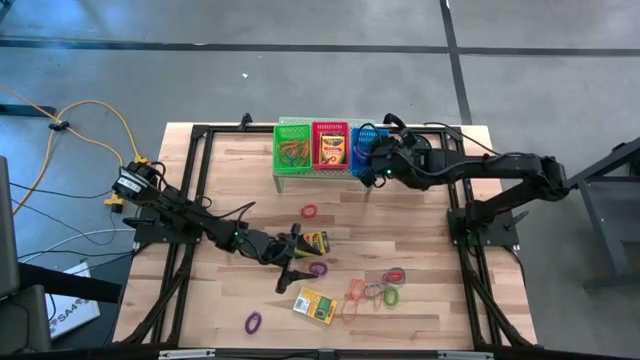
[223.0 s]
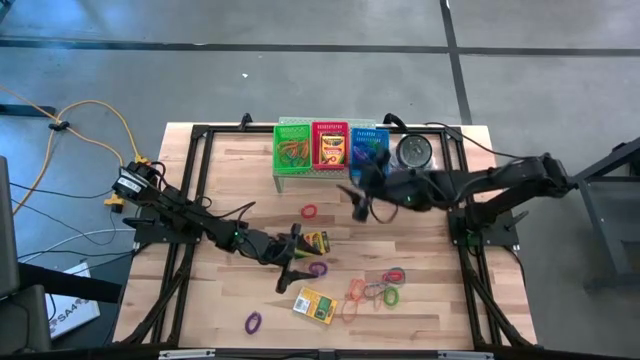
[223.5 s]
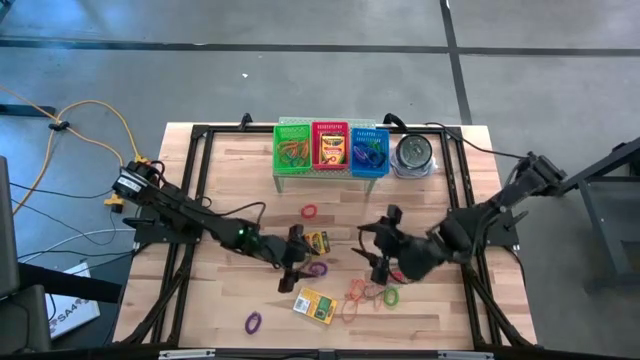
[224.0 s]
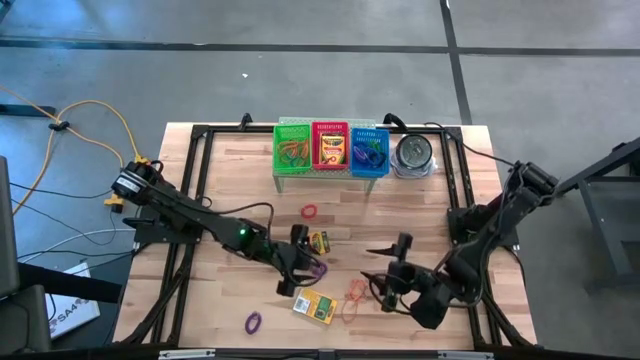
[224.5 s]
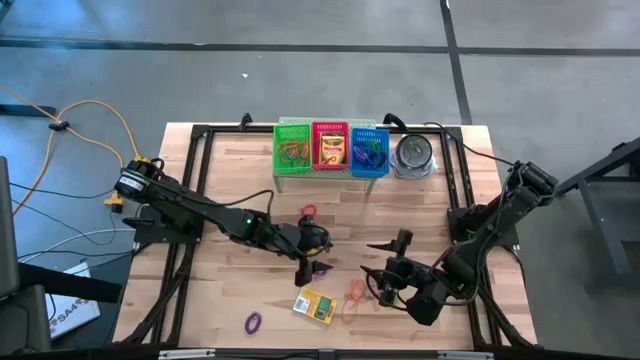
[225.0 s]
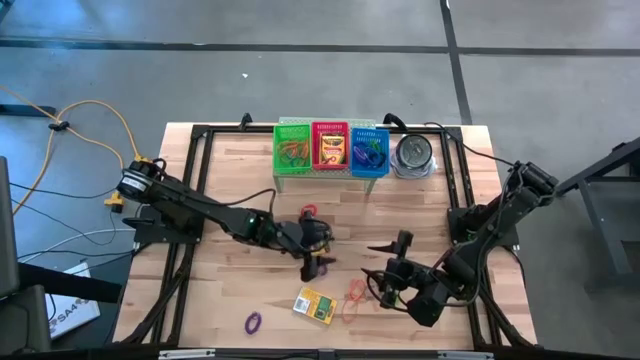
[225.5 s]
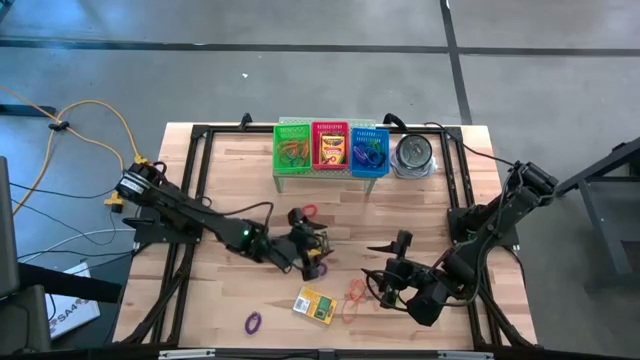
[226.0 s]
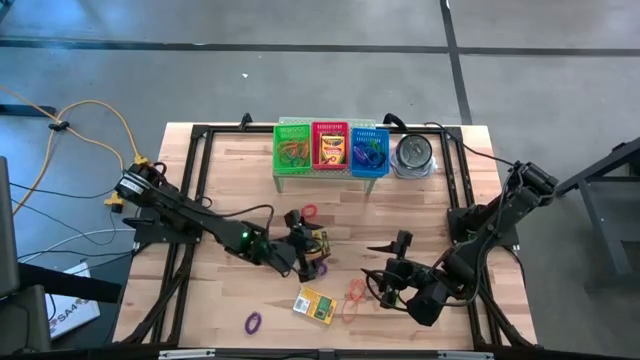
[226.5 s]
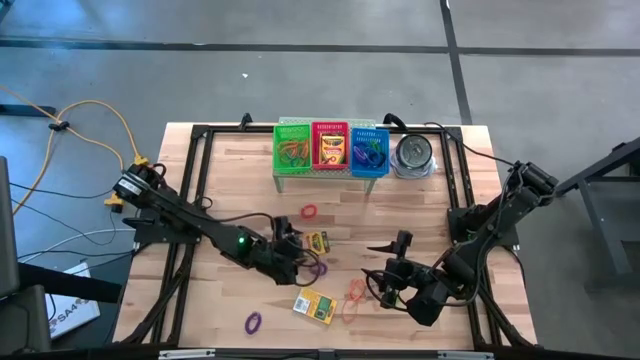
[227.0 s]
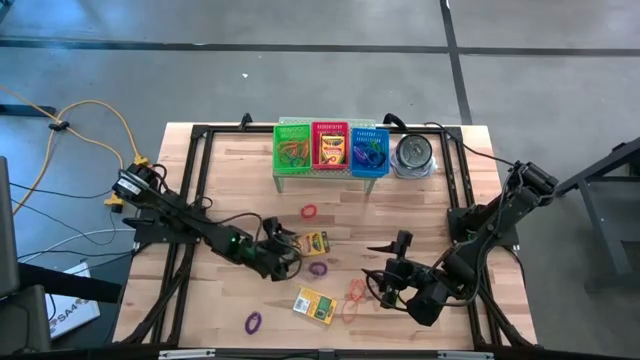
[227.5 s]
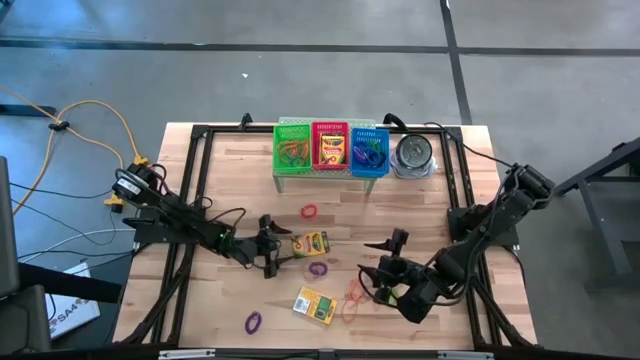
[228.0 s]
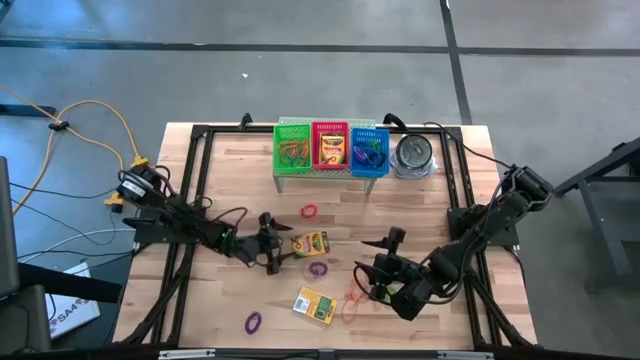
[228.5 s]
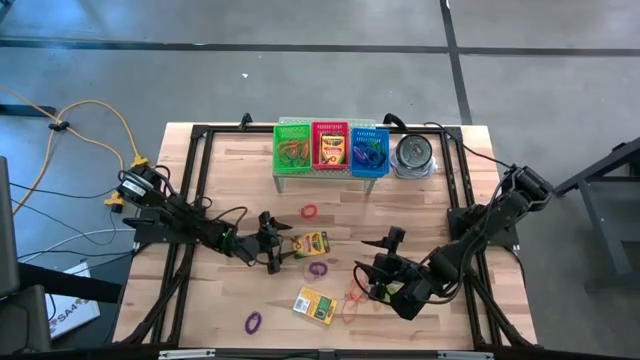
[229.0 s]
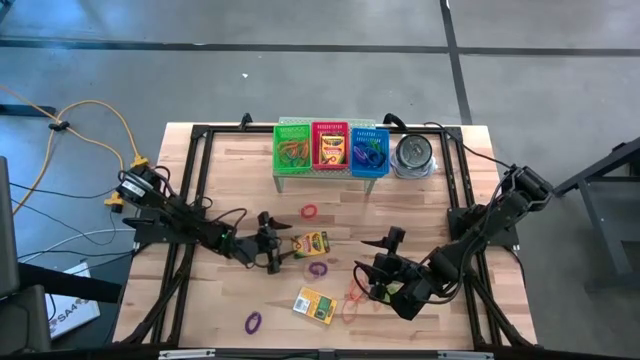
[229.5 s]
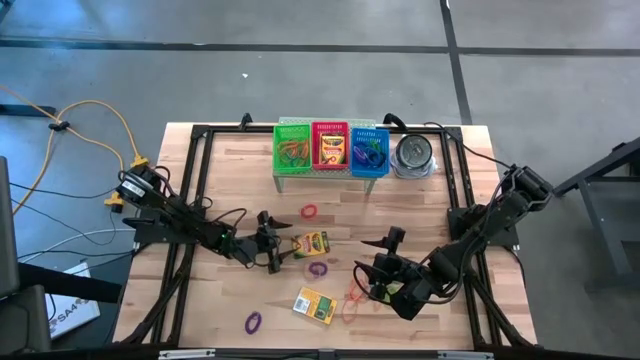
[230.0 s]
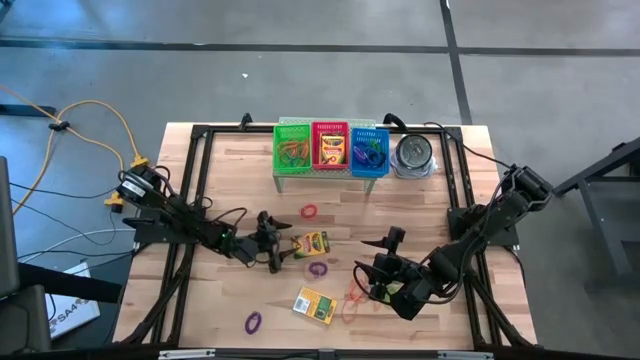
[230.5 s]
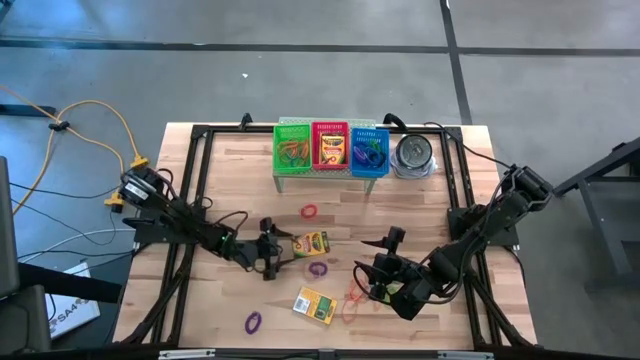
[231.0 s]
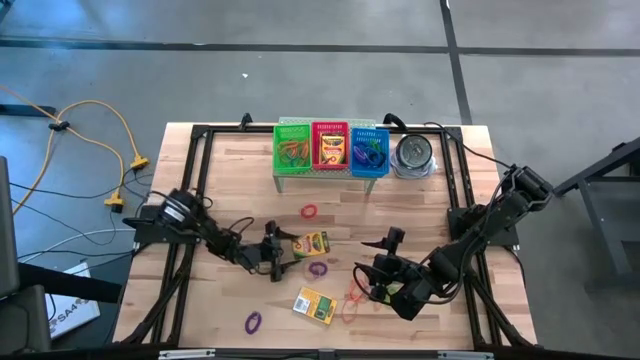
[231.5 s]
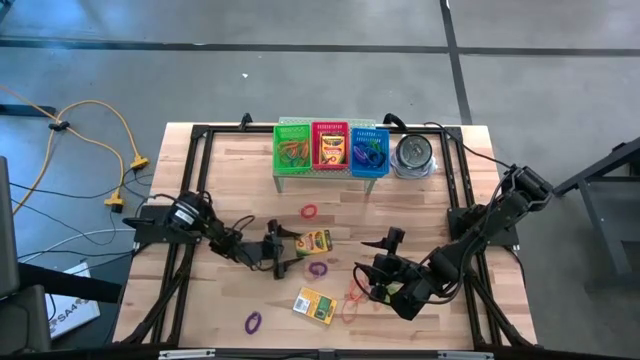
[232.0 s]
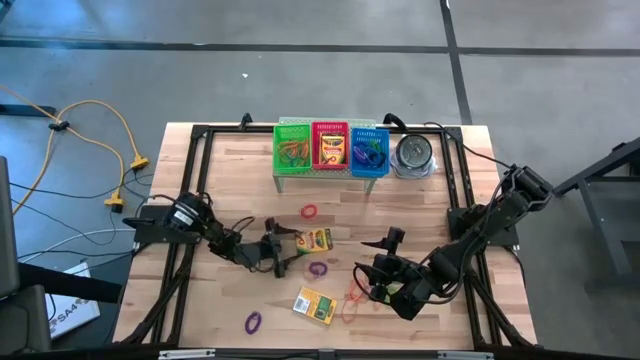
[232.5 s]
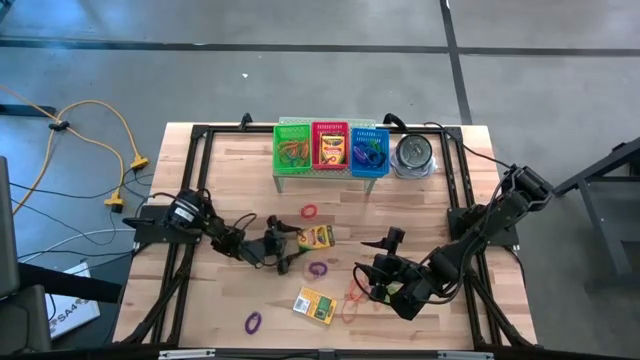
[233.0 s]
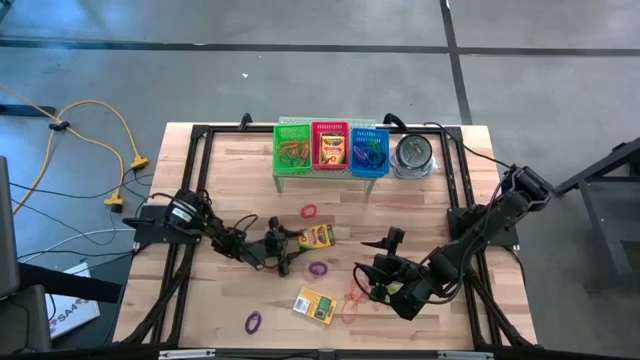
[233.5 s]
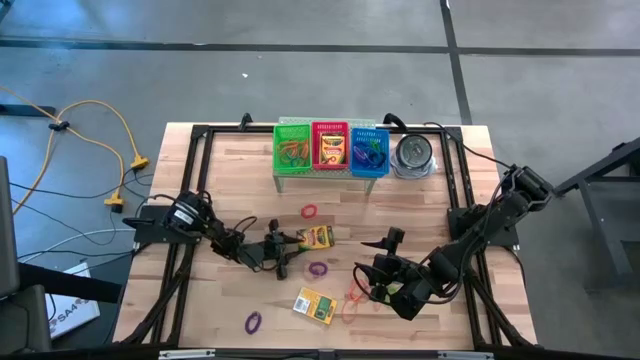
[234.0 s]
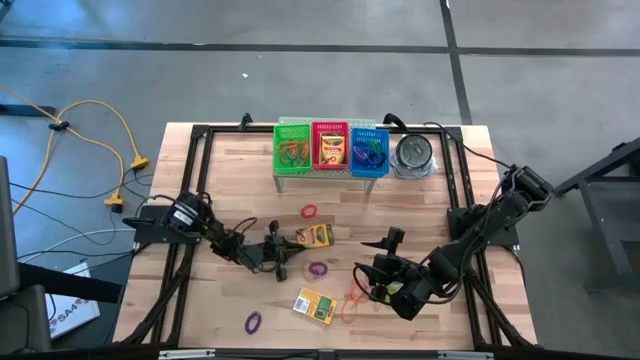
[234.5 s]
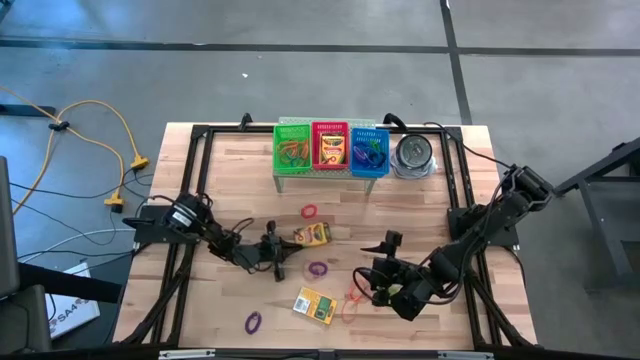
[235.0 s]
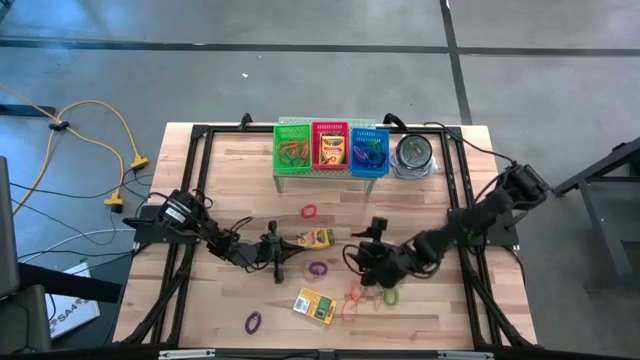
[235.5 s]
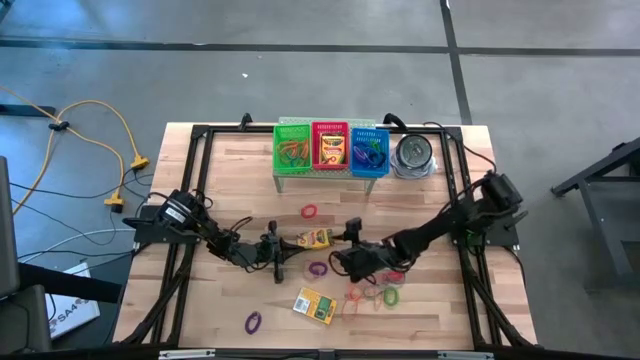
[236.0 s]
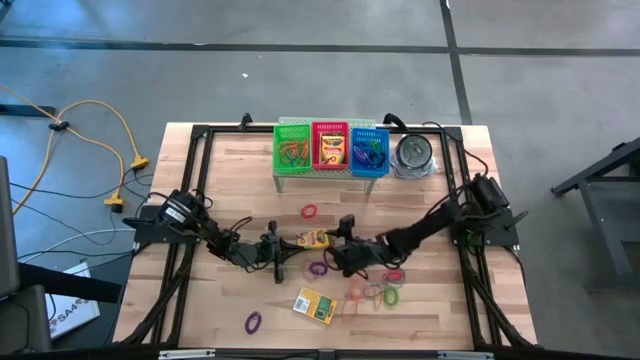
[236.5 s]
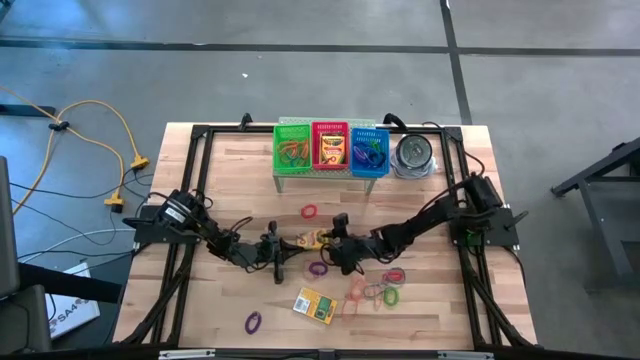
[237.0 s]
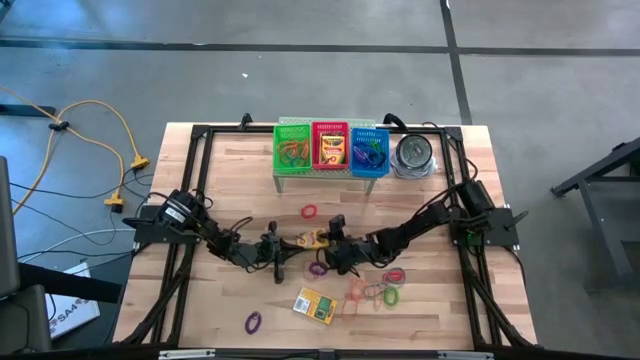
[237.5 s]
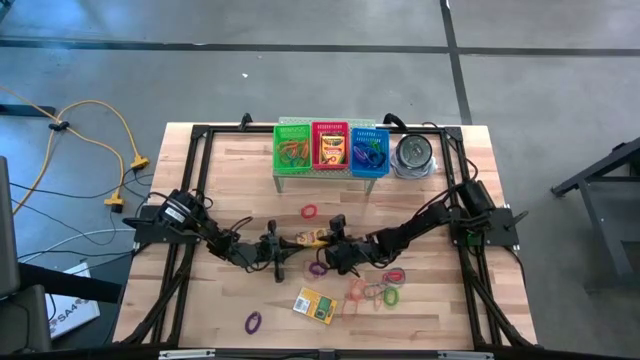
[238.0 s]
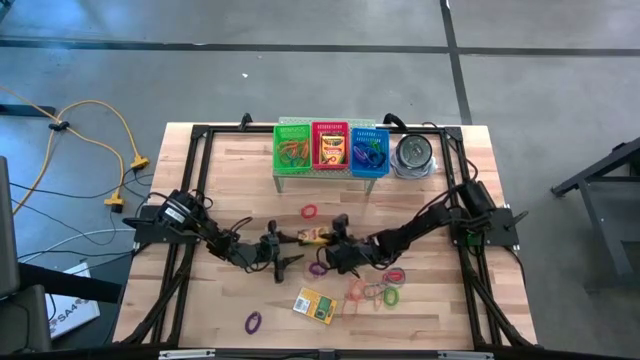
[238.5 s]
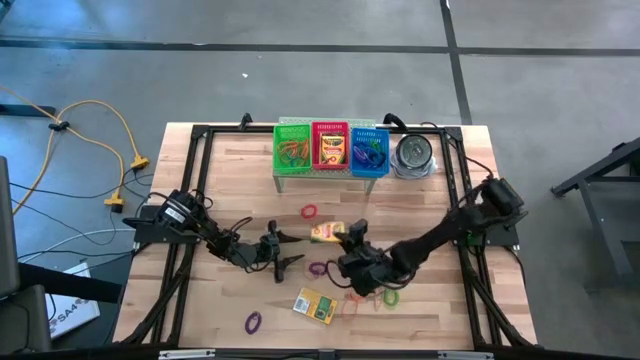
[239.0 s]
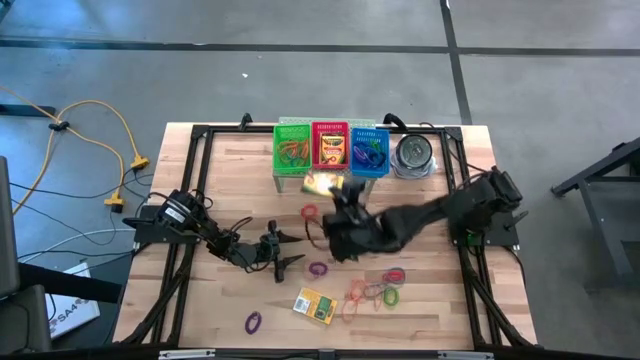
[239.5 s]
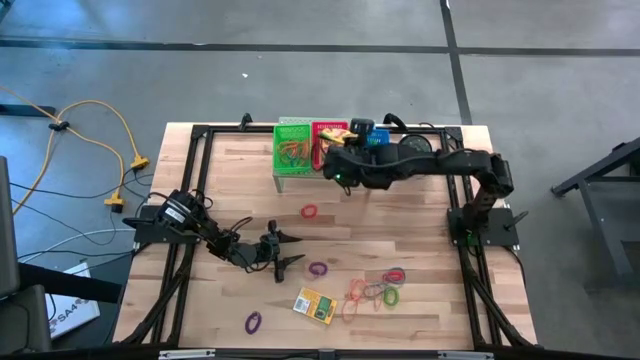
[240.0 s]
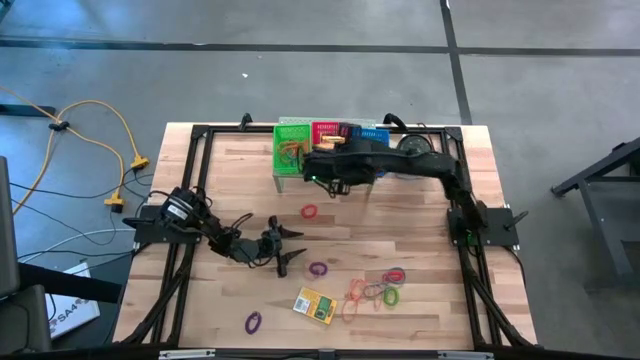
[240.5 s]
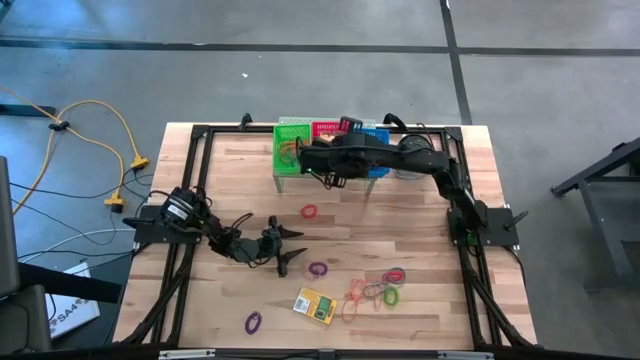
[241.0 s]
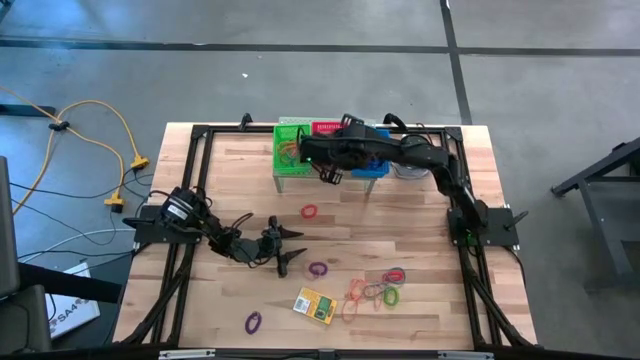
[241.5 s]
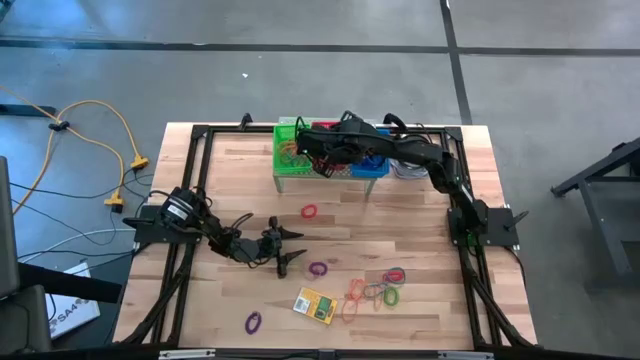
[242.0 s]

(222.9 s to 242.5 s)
Task: Pick & Place Office Desk Supplies
Put the top yellow crayon box into the red bin on the shelf
